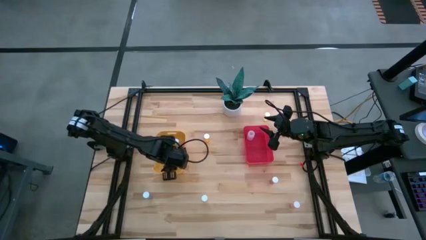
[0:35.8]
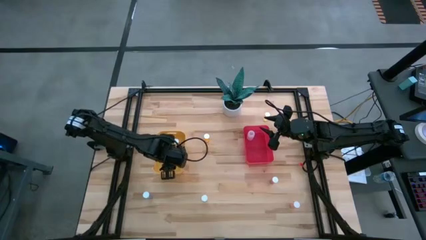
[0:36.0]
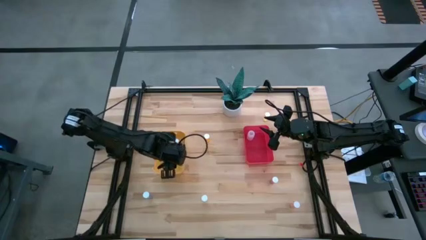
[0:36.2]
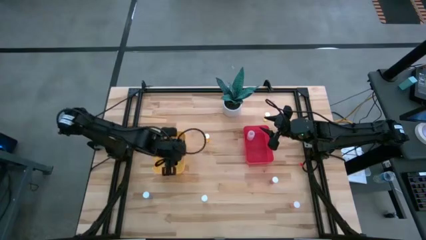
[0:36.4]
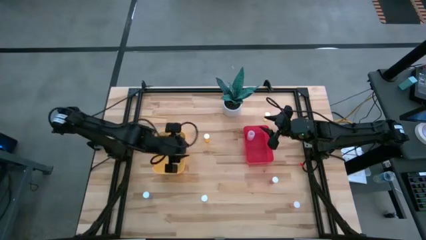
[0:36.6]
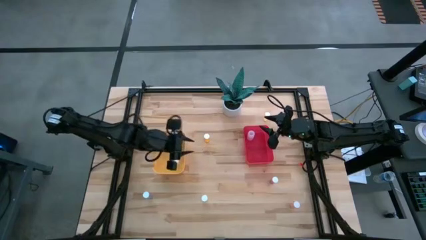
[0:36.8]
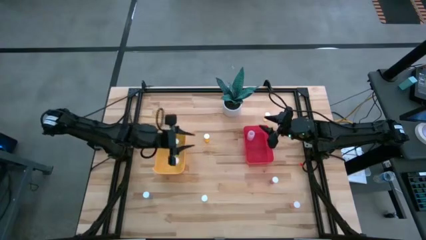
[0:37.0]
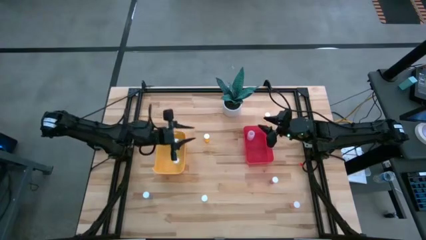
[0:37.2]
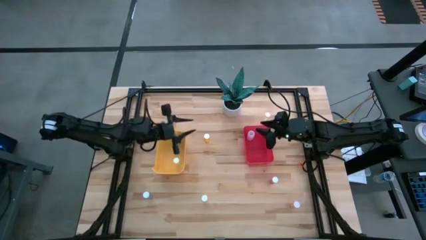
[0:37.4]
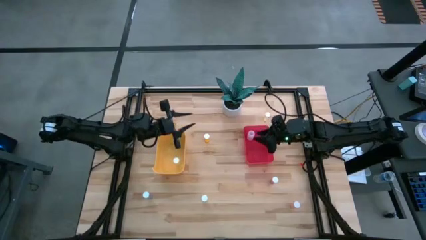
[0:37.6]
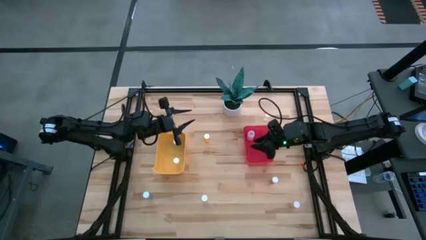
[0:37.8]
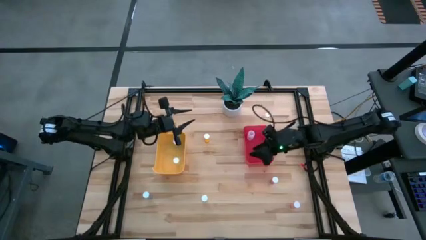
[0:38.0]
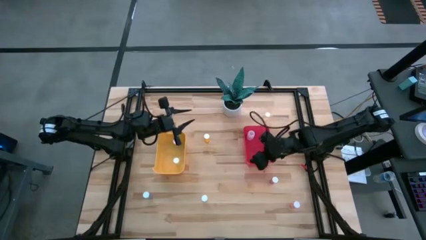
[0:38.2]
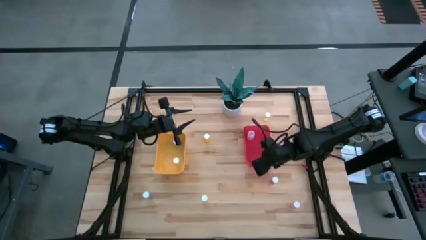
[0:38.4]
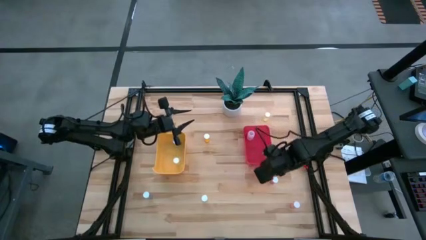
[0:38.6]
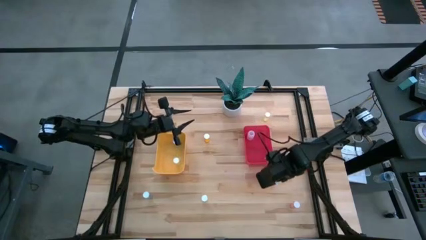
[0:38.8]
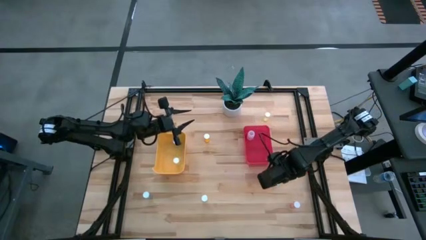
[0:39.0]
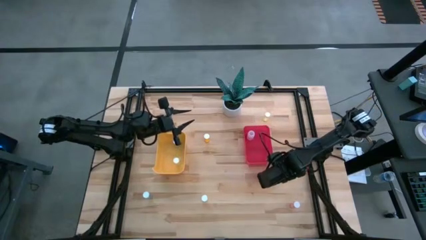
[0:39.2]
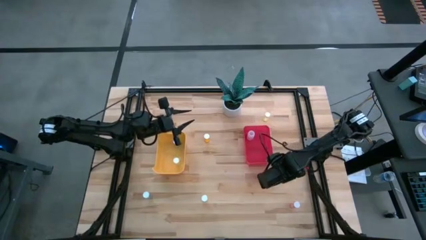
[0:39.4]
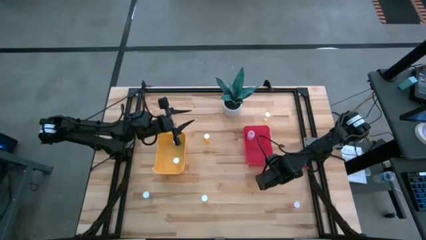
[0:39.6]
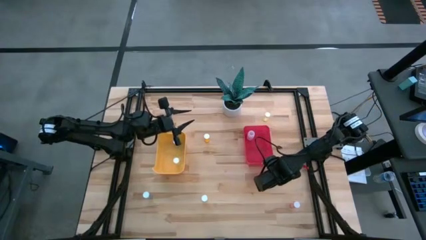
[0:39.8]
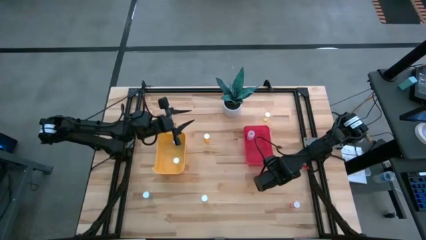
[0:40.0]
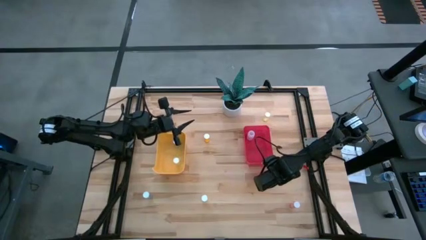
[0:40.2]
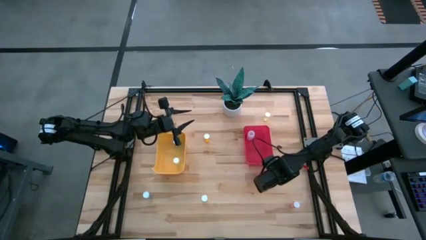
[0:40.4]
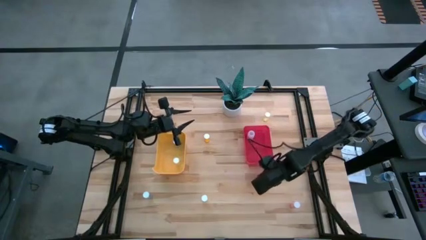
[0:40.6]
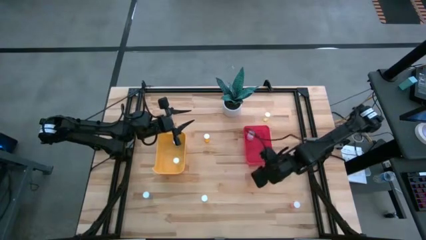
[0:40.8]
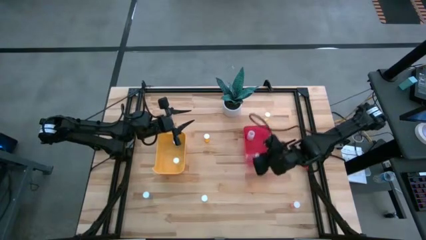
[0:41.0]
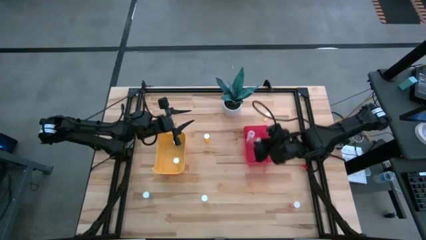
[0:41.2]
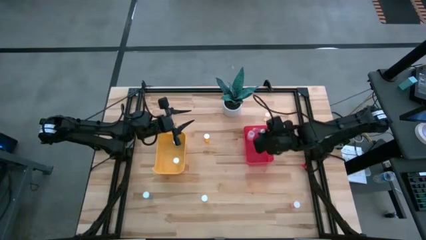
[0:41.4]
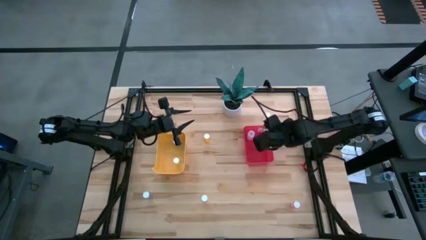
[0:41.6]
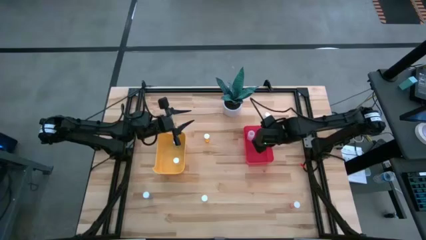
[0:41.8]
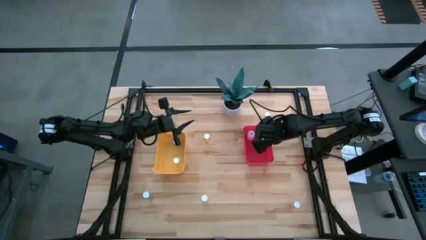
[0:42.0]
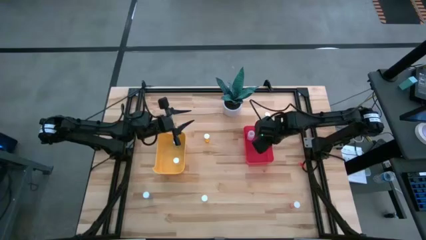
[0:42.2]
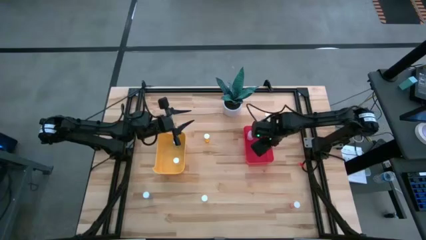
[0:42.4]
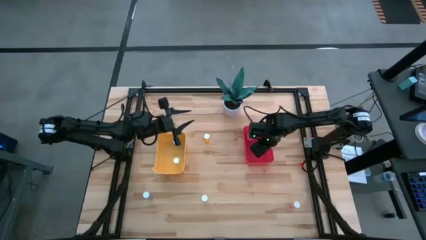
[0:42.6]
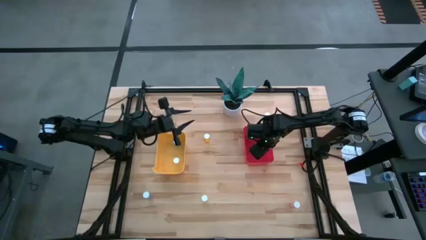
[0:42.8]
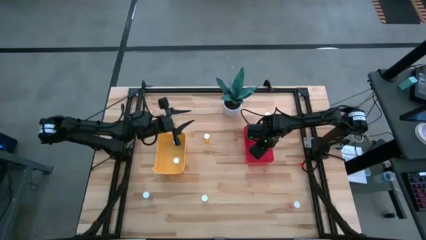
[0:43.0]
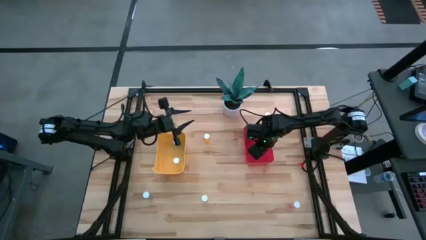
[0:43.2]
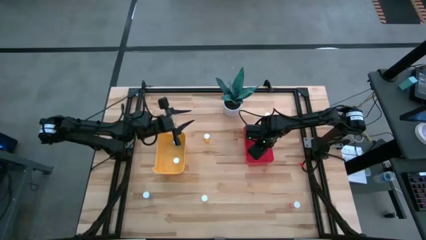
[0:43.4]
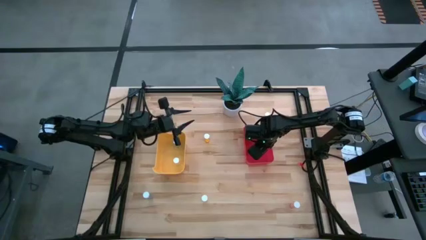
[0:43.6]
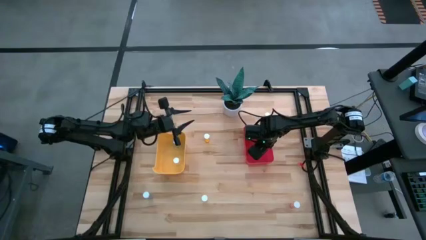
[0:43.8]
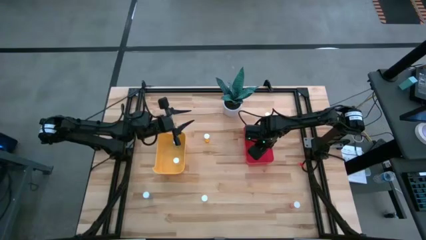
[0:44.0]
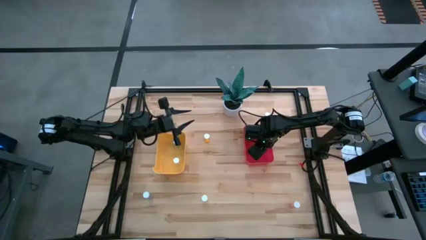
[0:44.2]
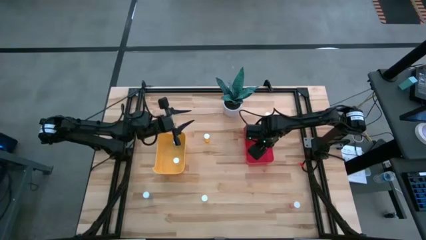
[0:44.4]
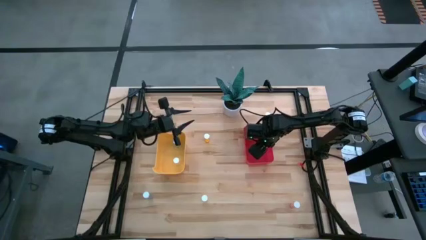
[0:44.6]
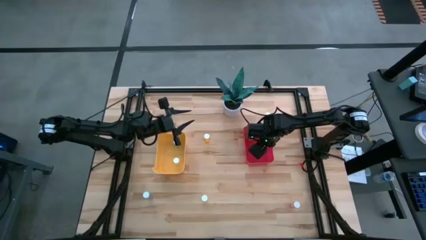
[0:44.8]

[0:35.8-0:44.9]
Task: Pick and place medicine bottles into bin by pill shape (circle, oval)
Put the top pink capsule bottle into the red bin

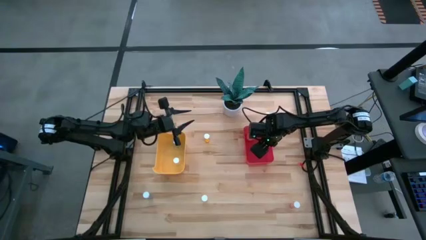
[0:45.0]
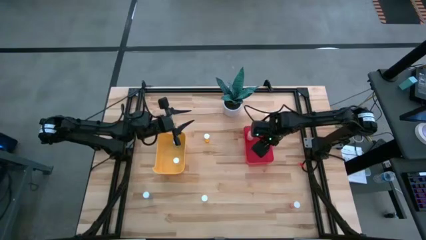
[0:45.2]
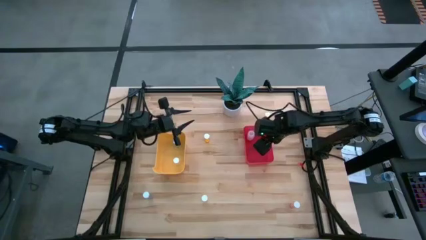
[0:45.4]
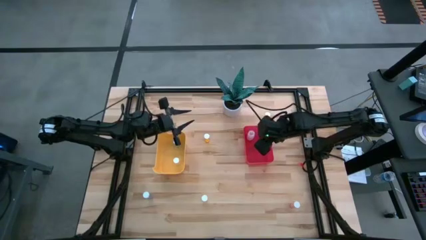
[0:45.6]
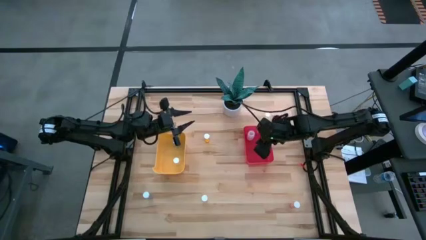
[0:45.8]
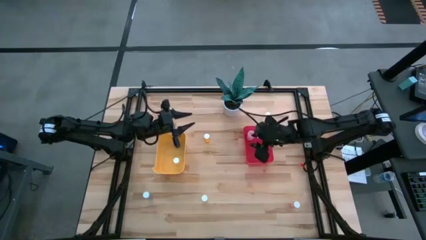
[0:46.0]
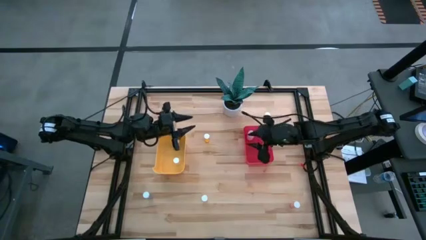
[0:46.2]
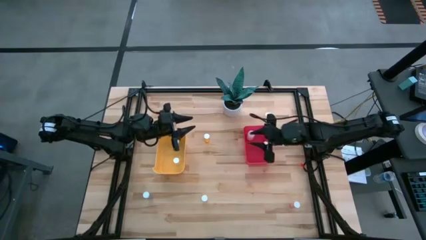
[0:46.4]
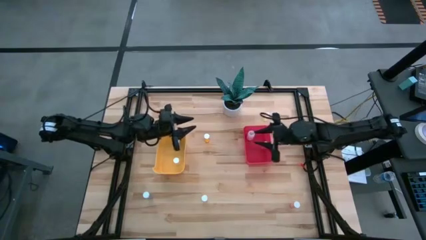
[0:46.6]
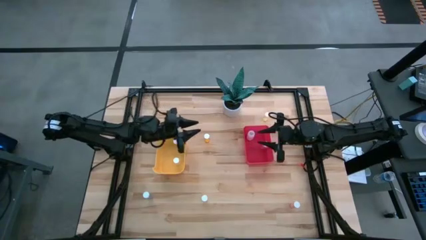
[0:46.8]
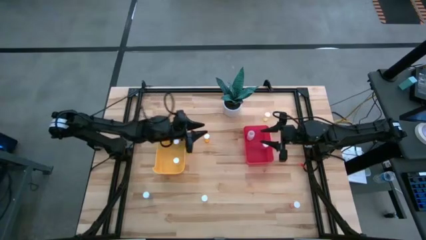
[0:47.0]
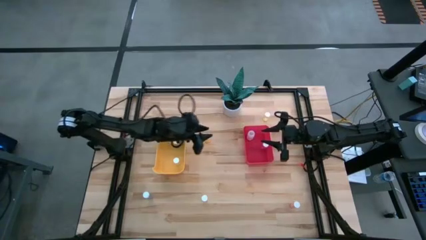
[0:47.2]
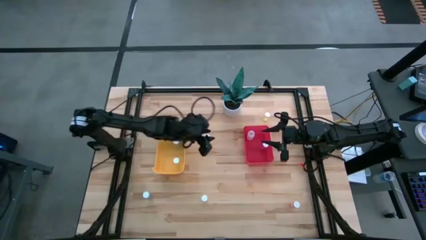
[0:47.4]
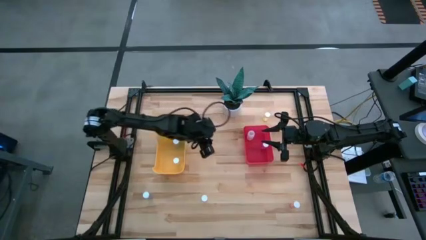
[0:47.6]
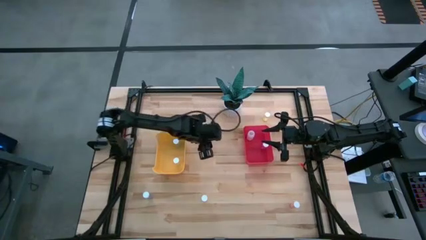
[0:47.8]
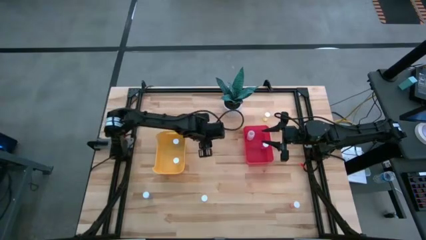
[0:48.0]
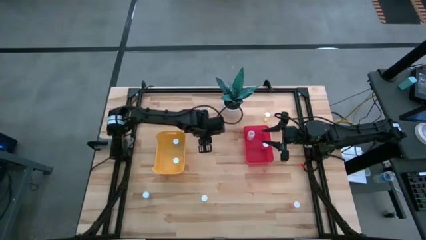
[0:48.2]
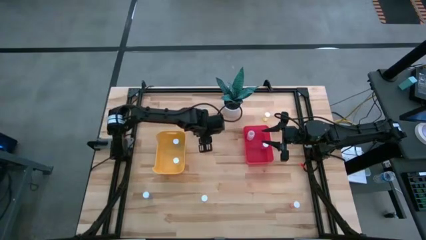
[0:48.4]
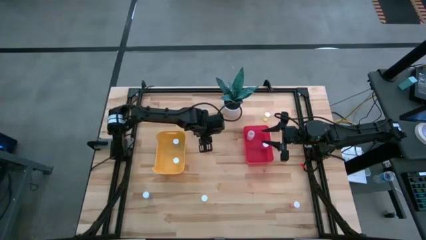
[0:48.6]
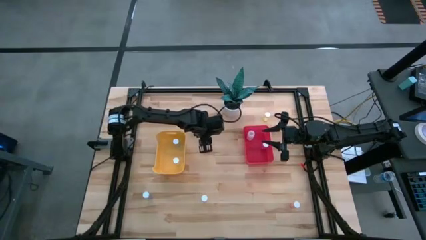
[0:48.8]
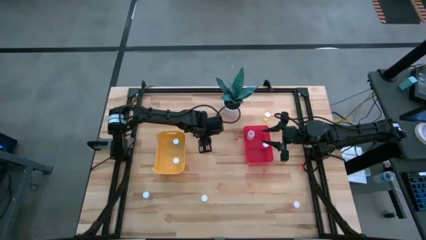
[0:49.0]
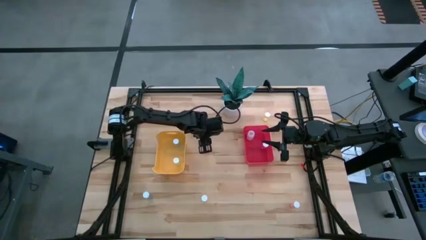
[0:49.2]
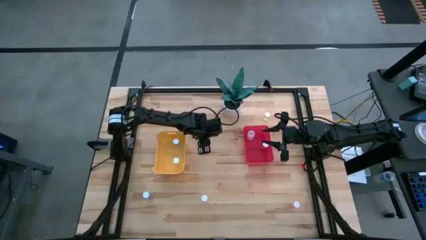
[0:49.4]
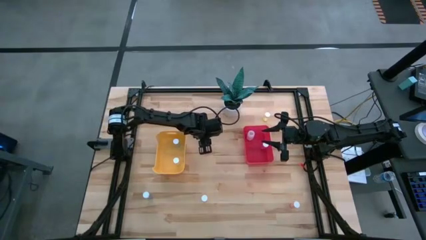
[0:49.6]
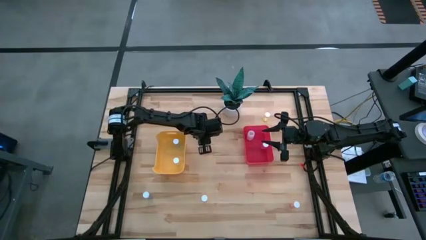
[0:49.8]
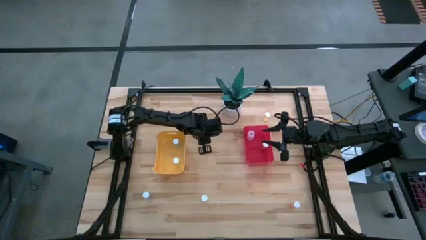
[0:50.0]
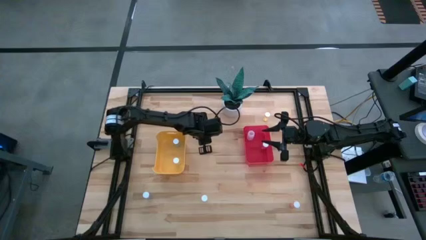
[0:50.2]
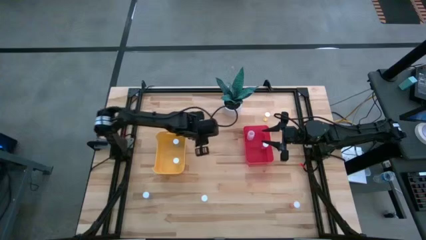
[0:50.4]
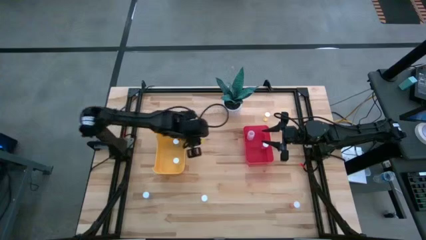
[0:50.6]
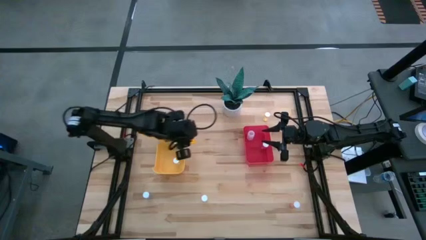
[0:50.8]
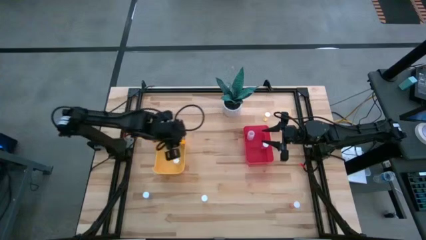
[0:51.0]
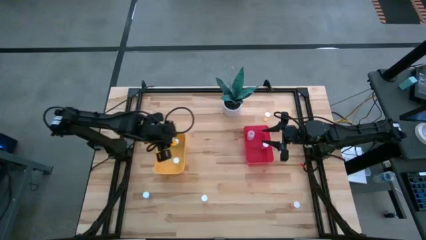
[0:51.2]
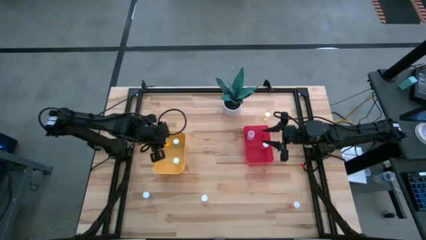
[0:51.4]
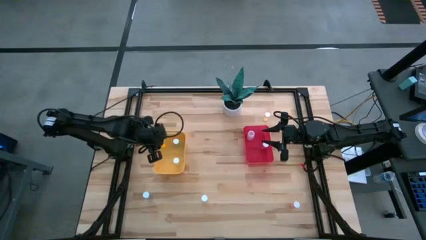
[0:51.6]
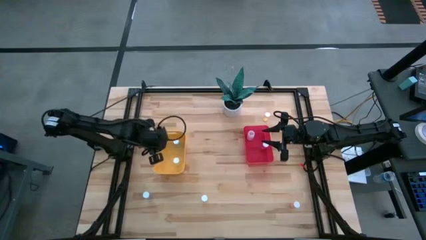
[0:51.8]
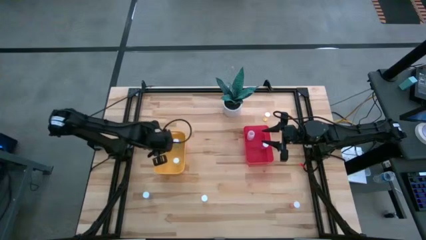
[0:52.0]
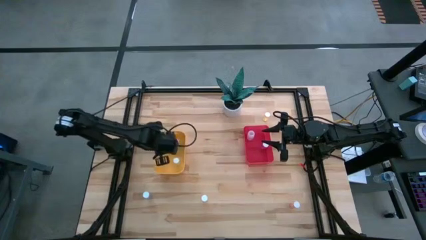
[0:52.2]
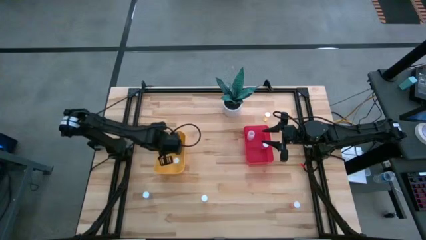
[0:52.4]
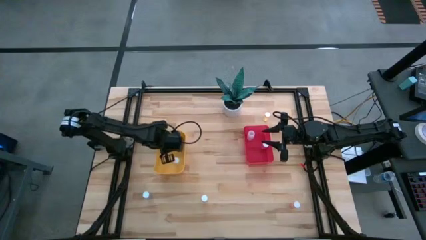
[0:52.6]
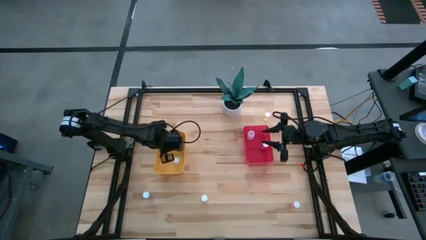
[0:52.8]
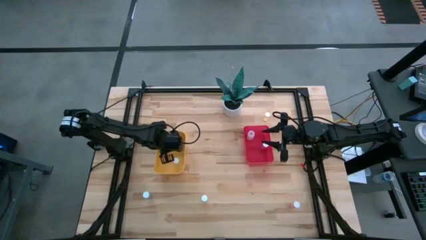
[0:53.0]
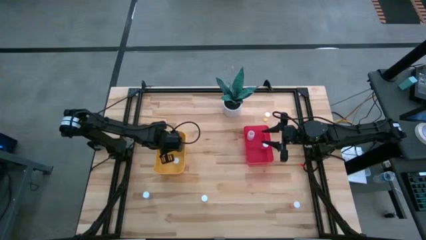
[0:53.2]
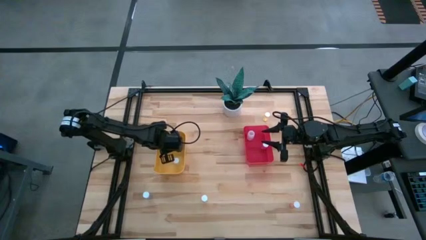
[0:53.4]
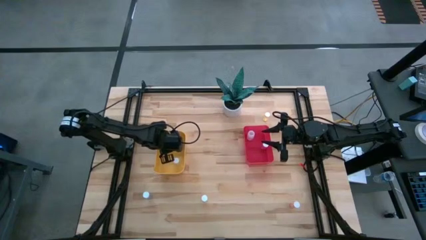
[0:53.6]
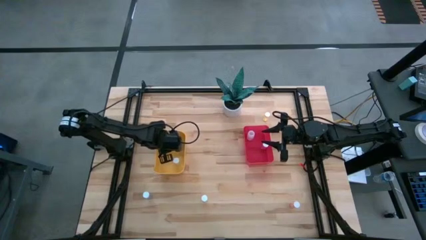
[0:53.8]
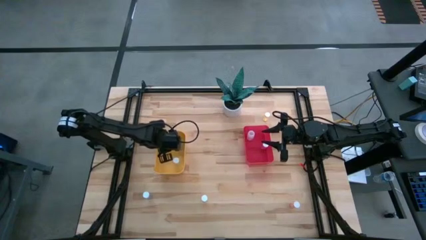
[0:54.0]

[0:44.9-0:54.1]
Put the orange tablet bottle into the yellow bin
